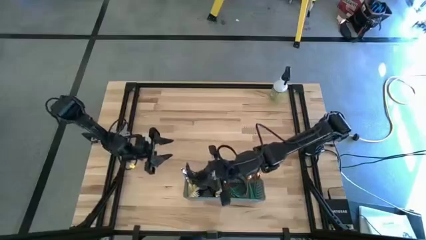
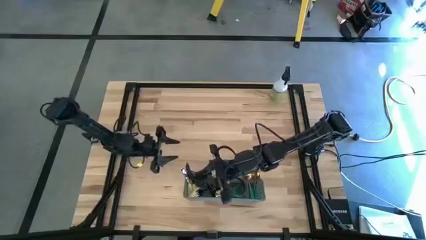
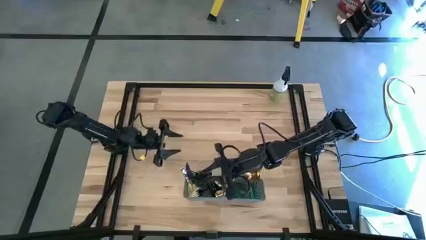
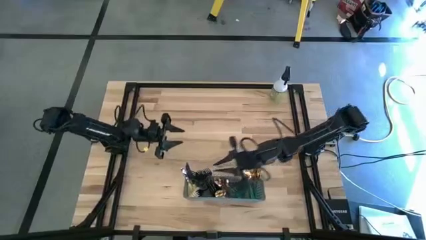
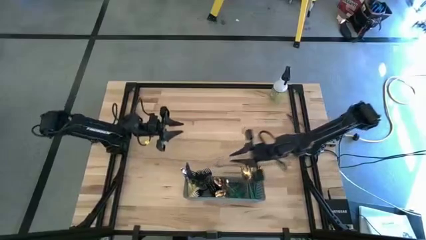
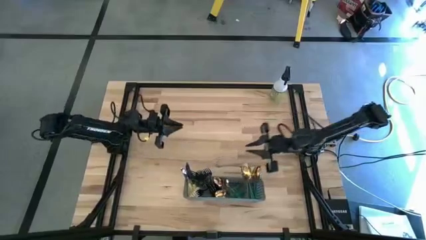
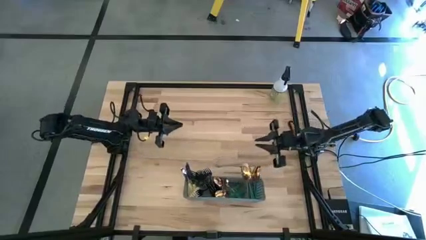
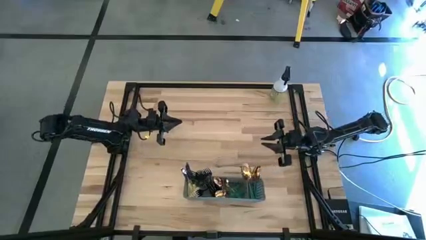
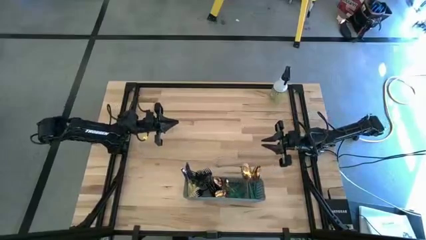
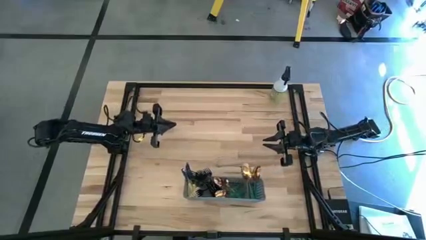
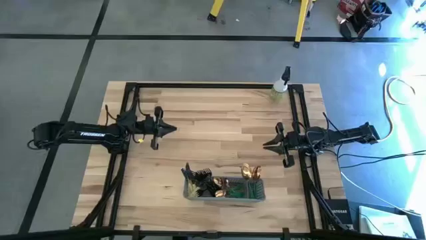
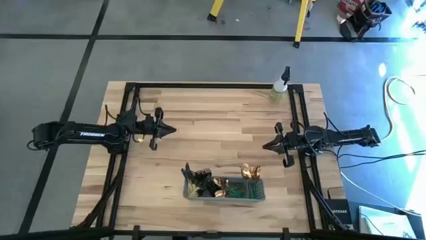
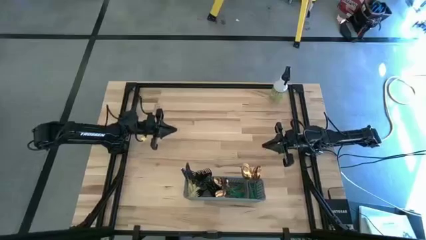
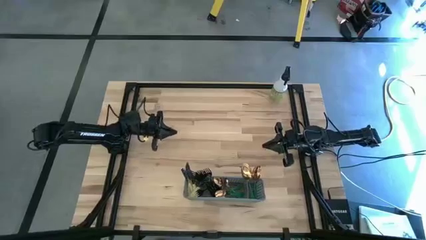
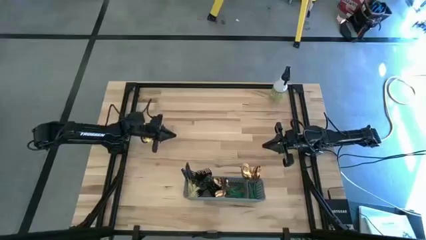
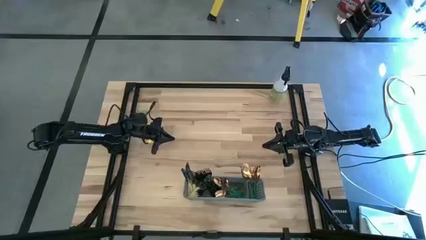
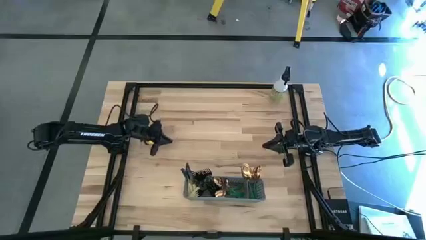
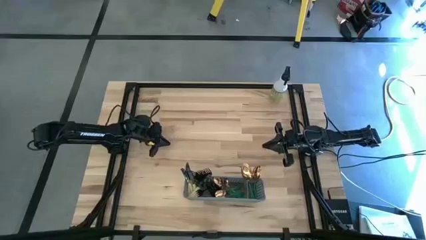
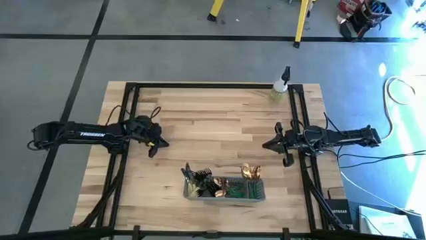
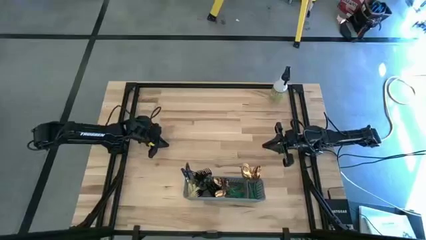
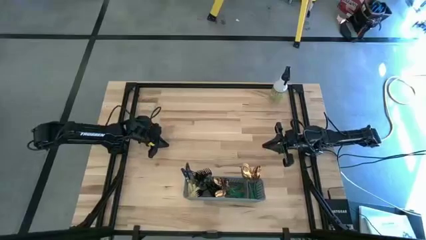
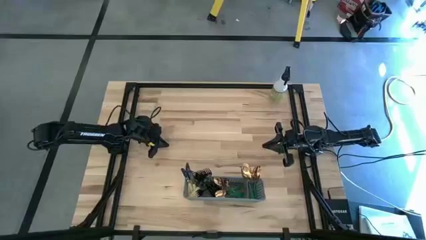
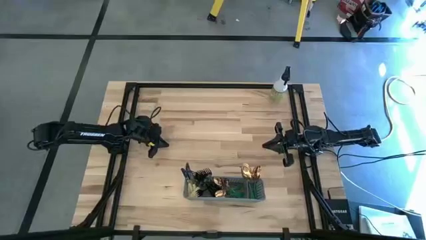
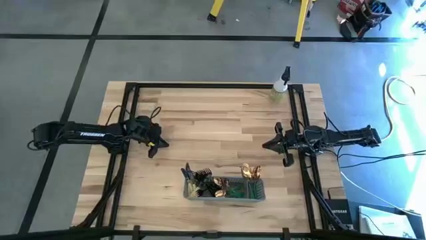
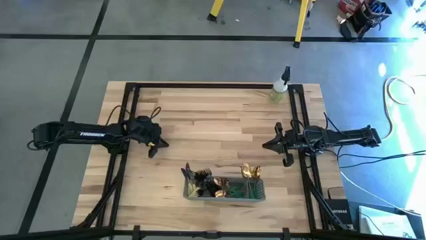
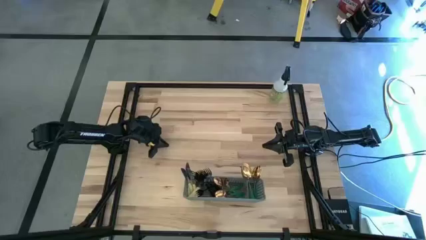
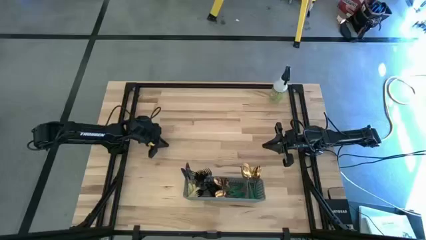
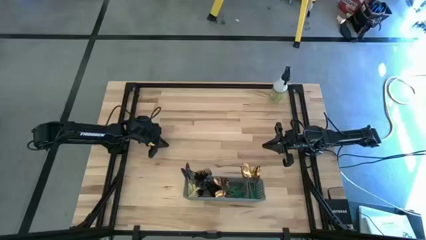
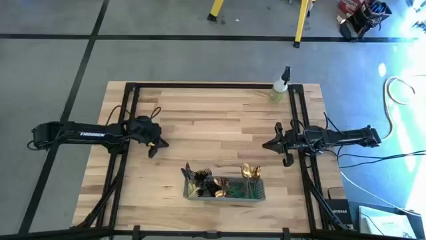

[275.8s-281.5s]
Task: Sort silverware
Return to Home Position

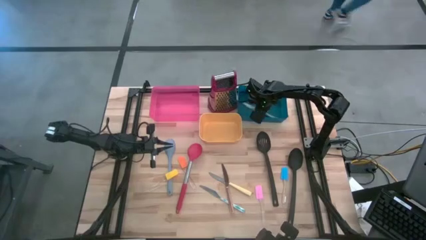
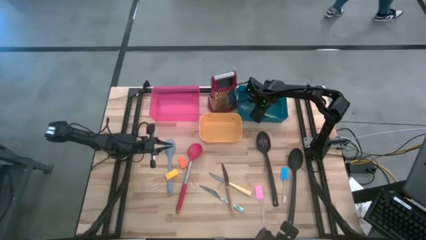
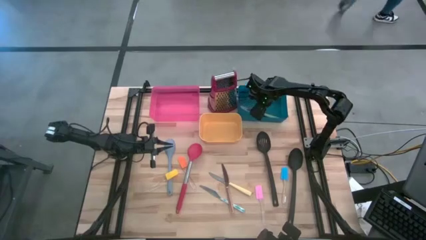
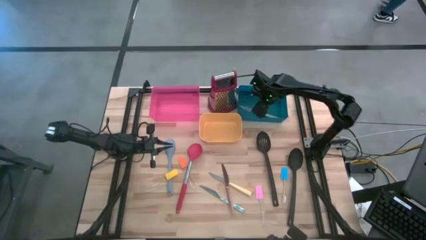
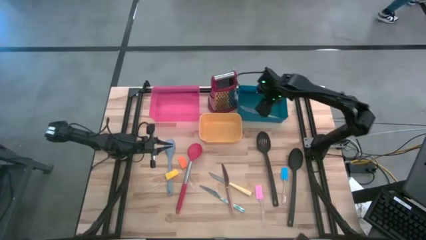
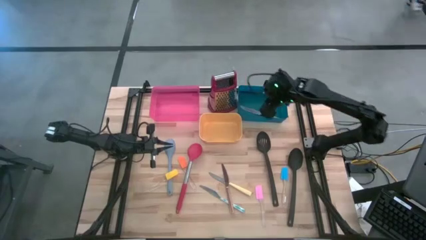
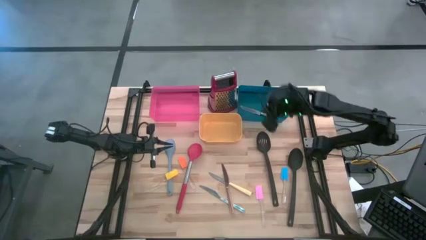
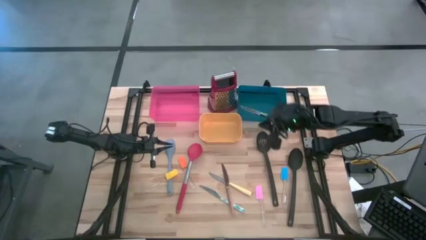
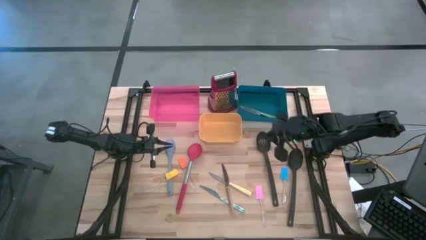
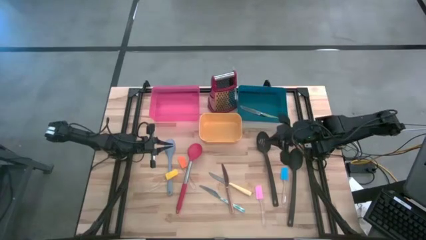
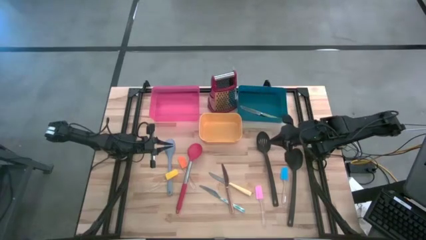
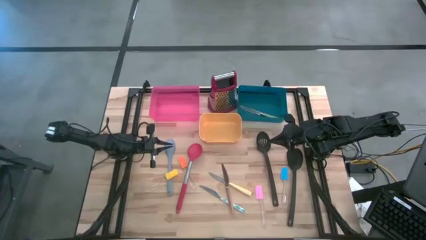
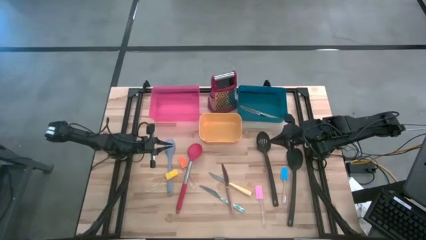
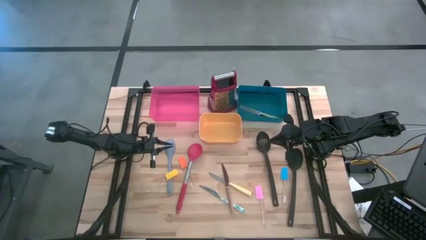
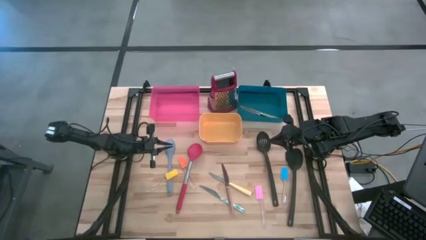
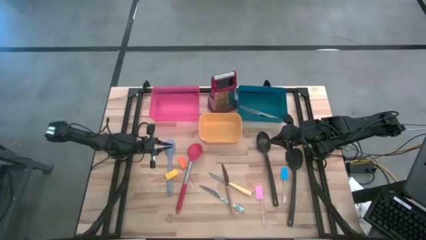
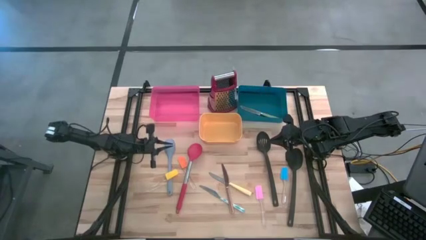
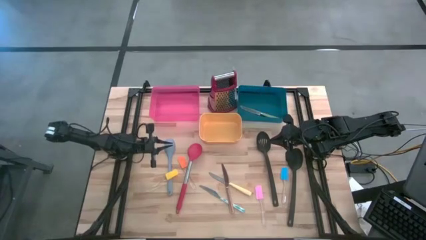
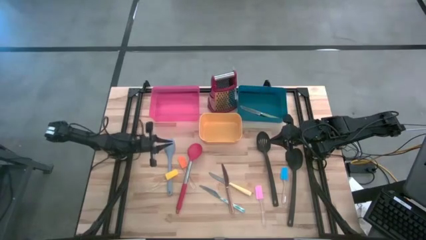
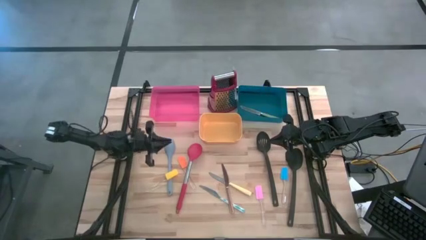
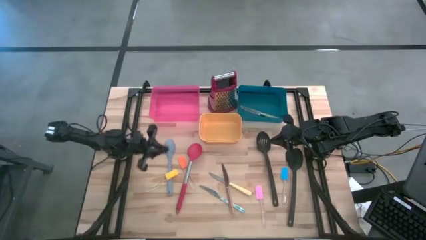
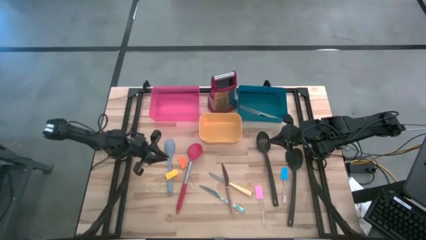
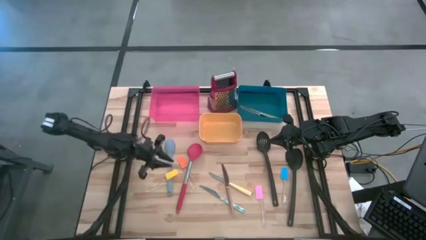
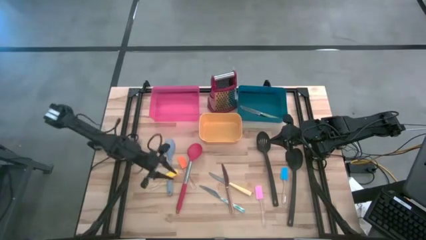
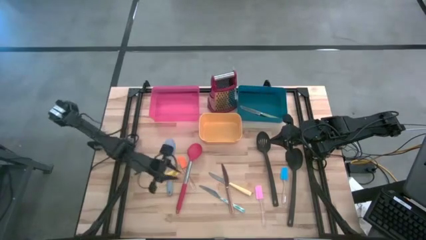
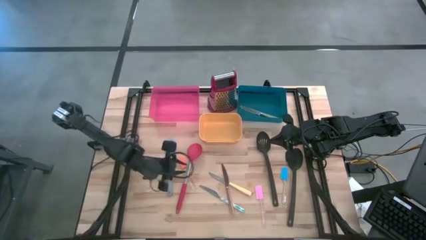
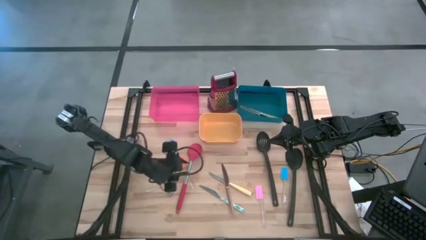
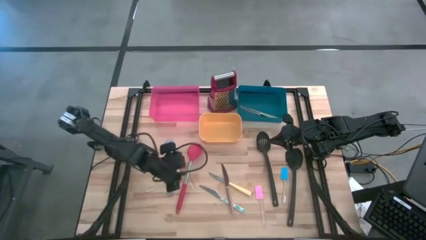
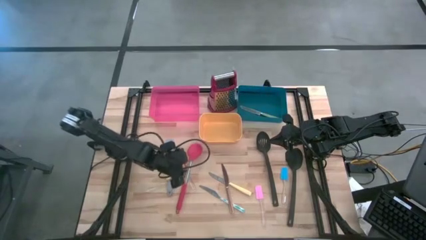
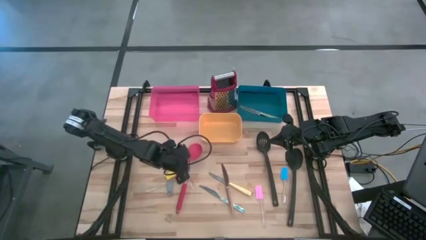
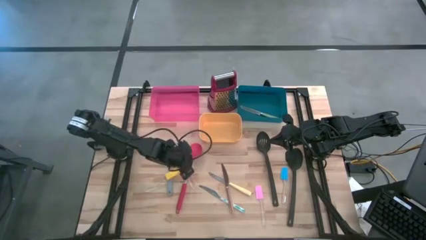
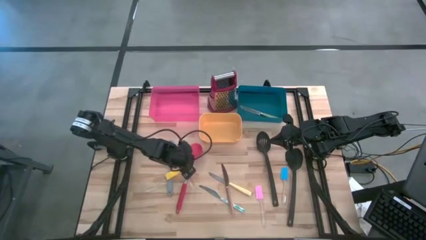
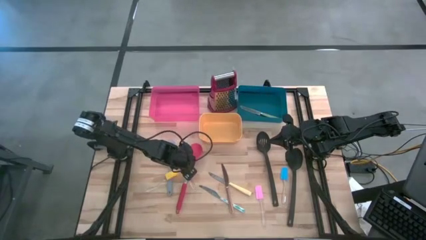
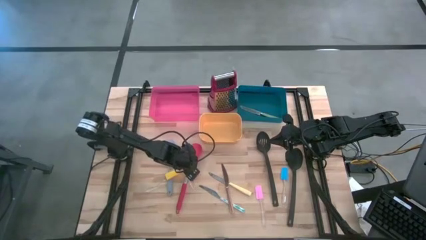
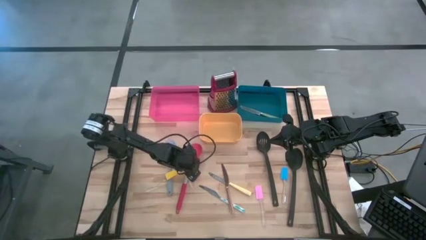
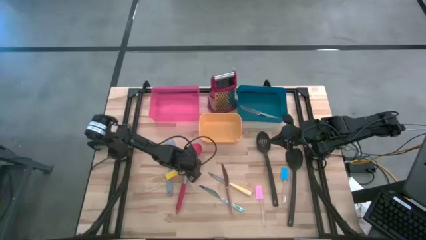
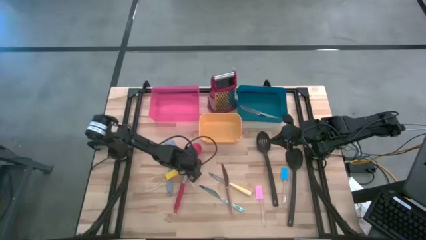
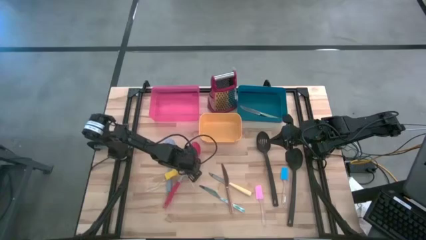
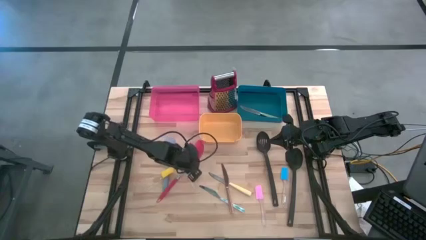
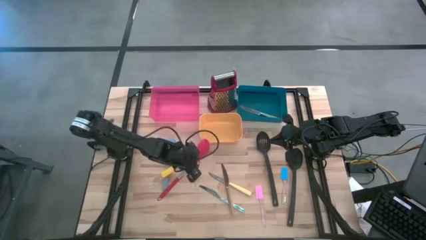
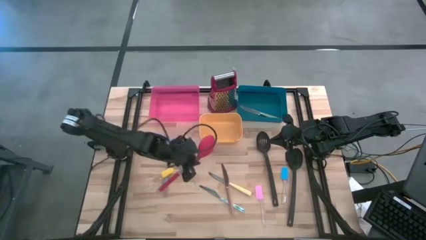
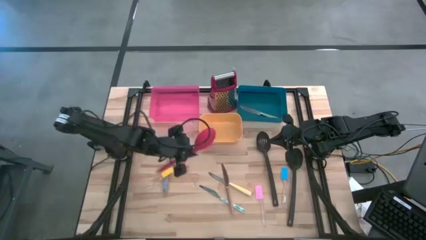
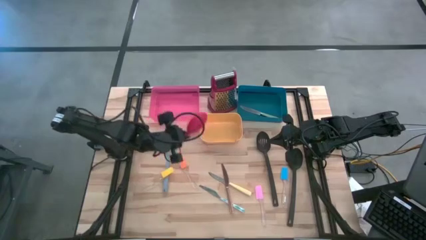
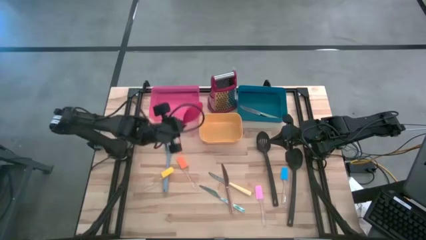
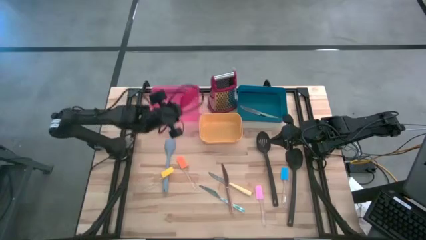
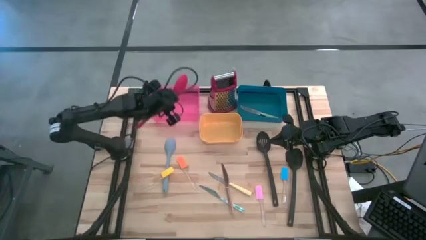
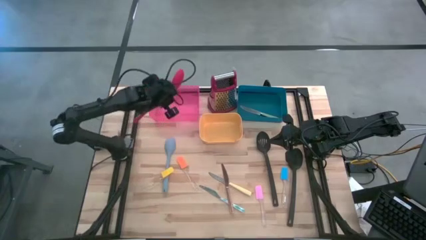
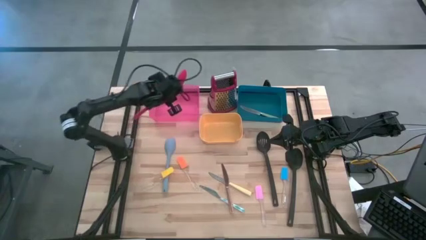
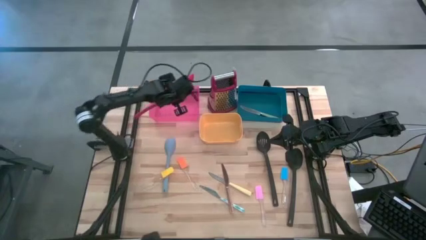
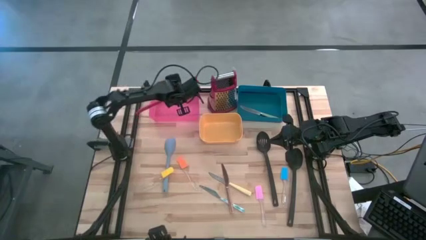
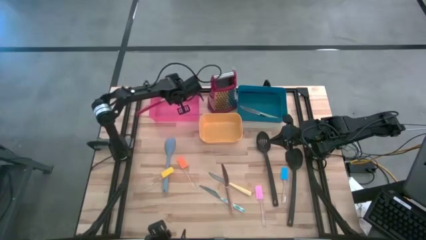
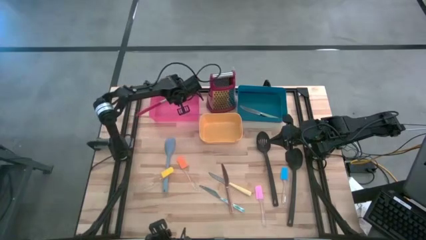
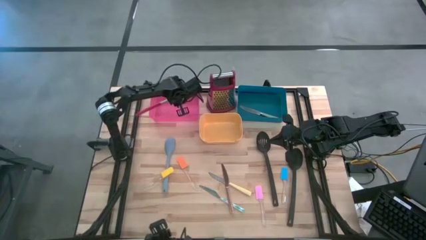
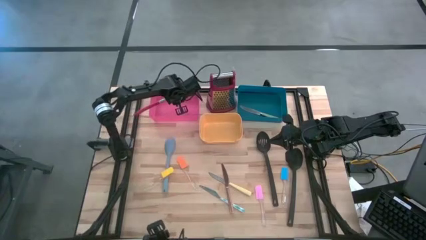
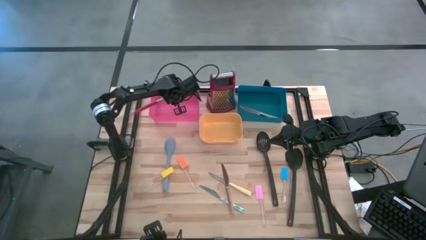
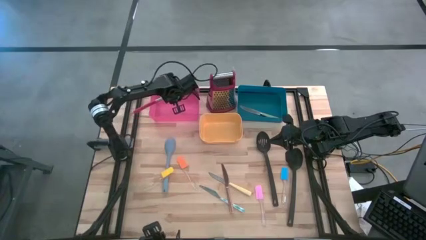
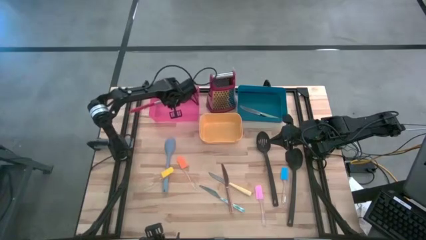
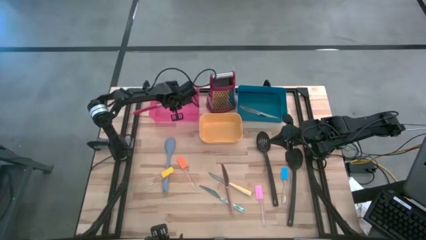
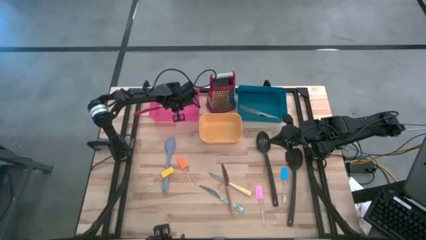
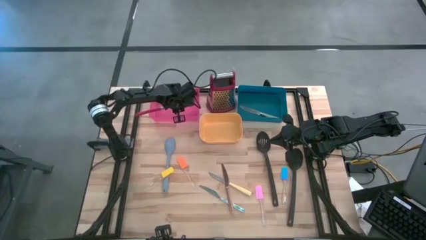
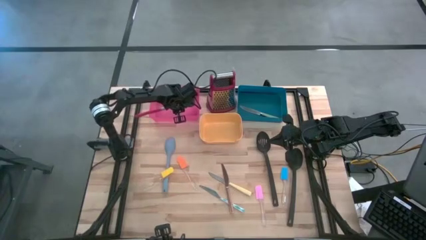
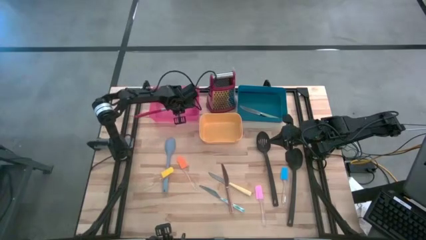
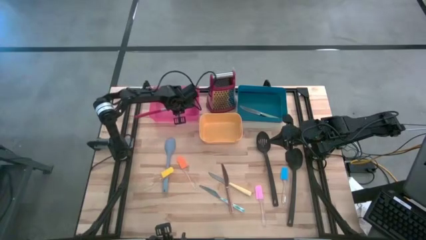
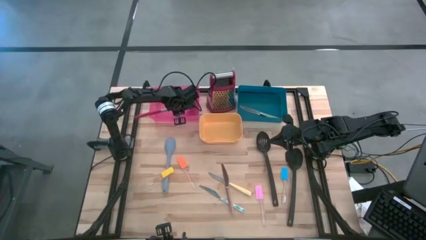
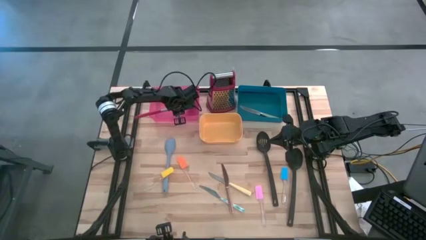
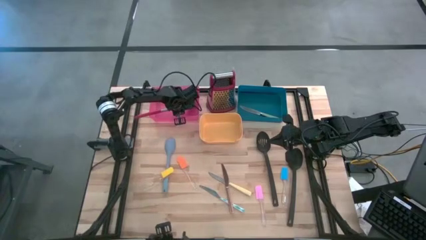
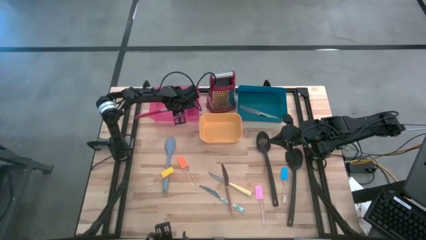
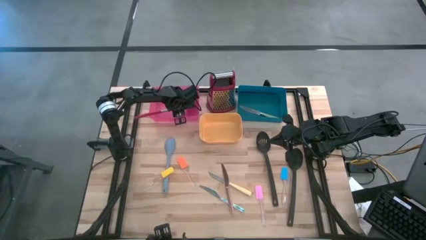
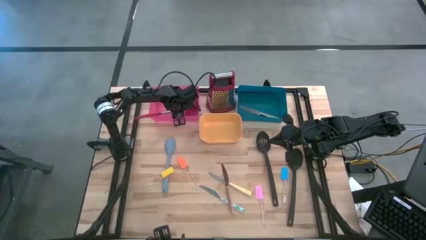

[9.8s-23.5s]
Task: Pick & Place Kitchen Items
Put the red serving spoon into the red bin
